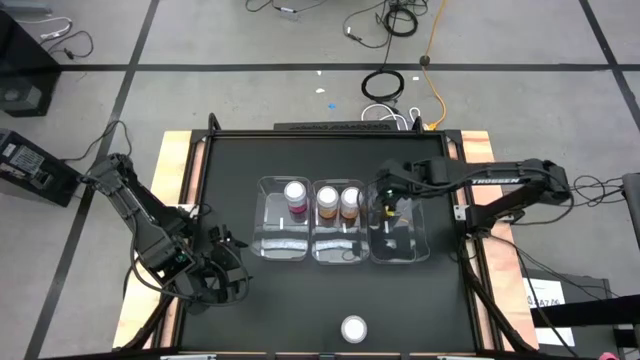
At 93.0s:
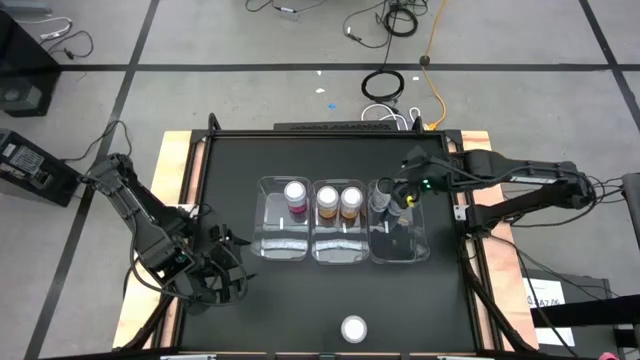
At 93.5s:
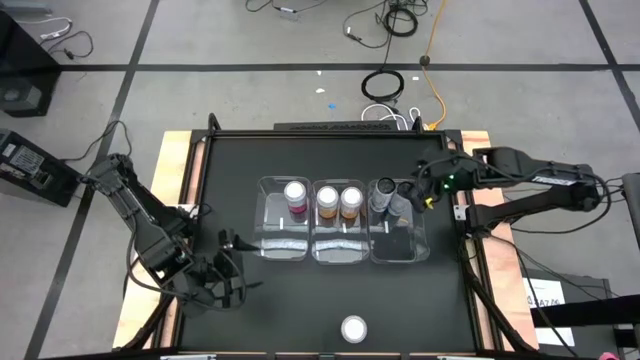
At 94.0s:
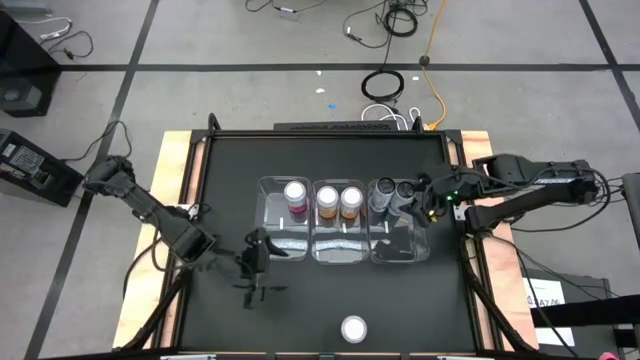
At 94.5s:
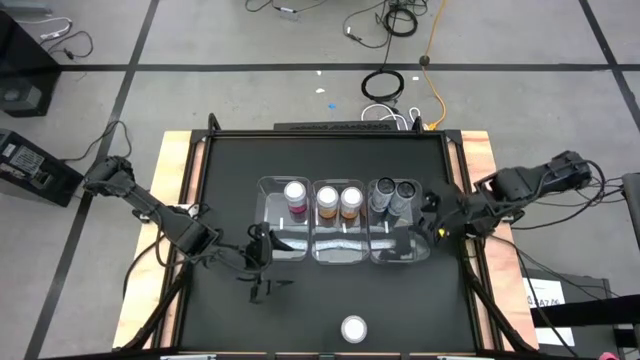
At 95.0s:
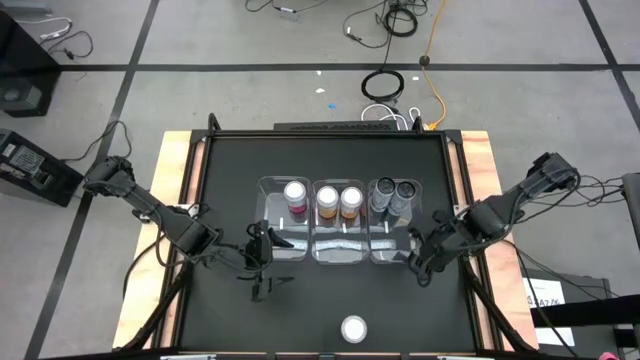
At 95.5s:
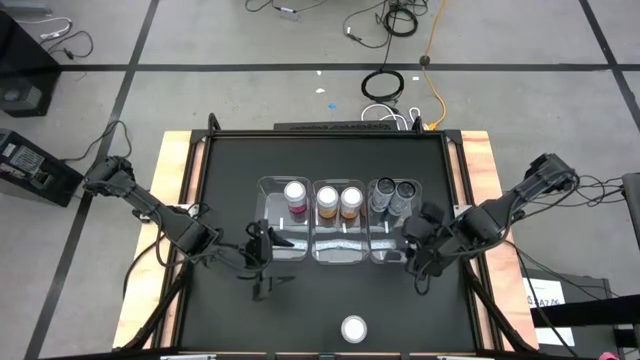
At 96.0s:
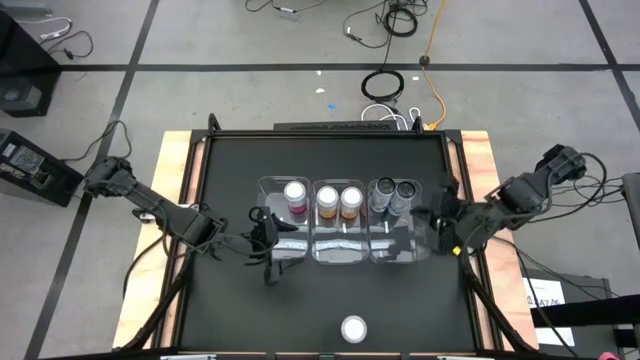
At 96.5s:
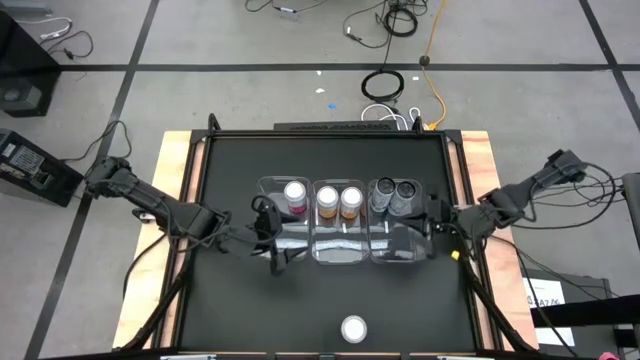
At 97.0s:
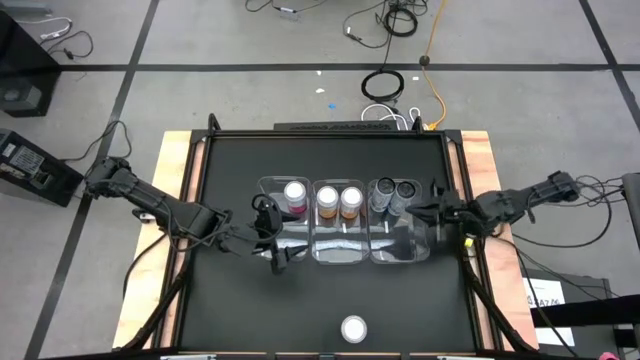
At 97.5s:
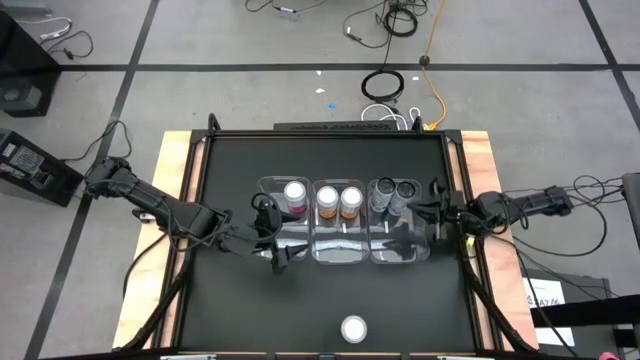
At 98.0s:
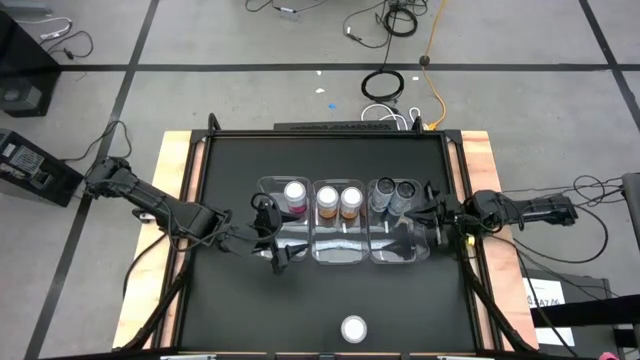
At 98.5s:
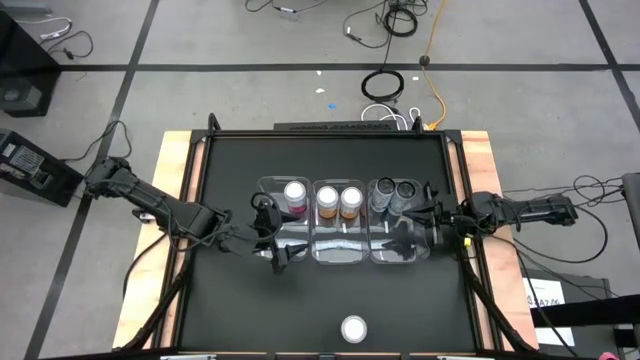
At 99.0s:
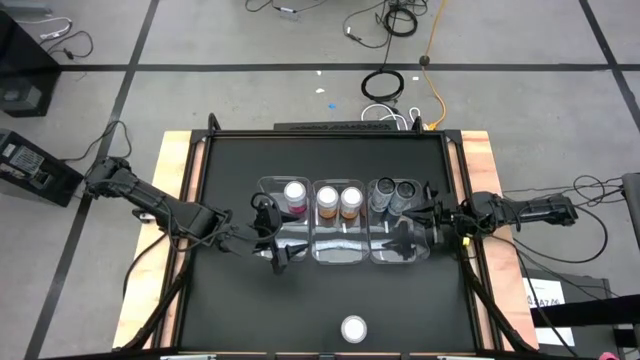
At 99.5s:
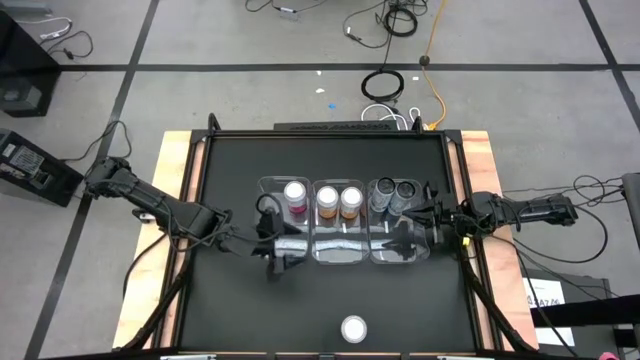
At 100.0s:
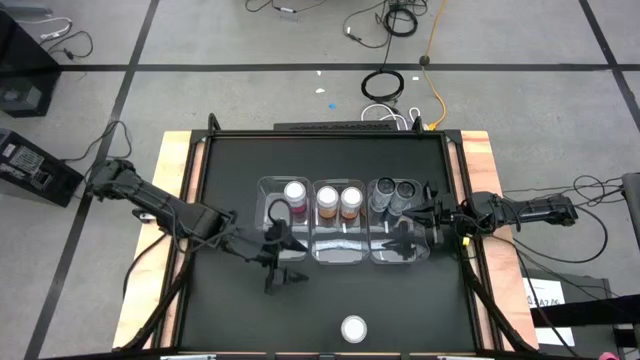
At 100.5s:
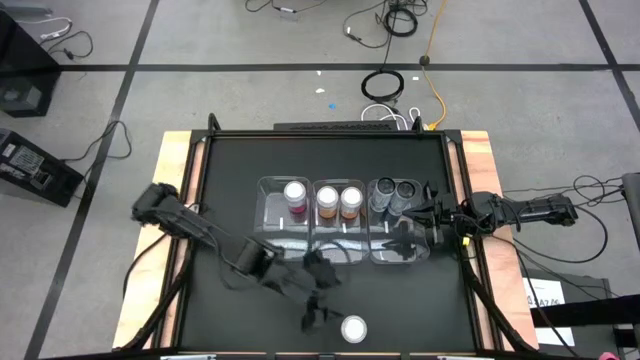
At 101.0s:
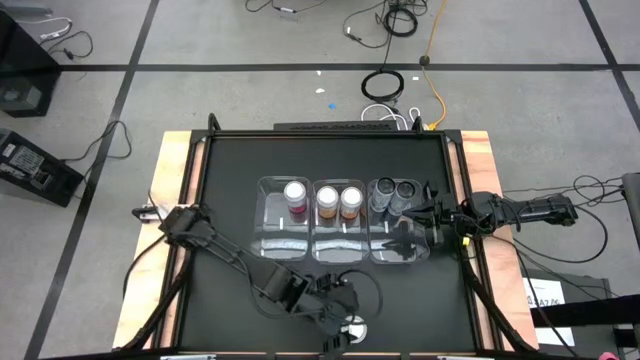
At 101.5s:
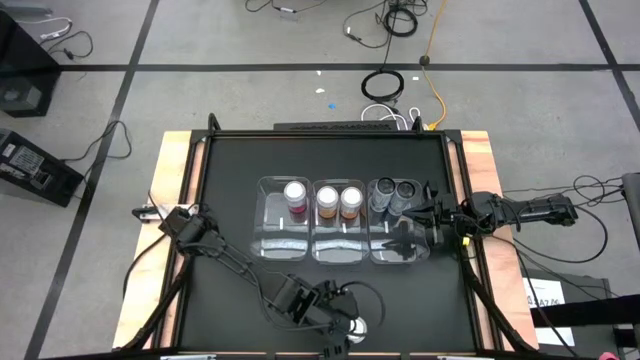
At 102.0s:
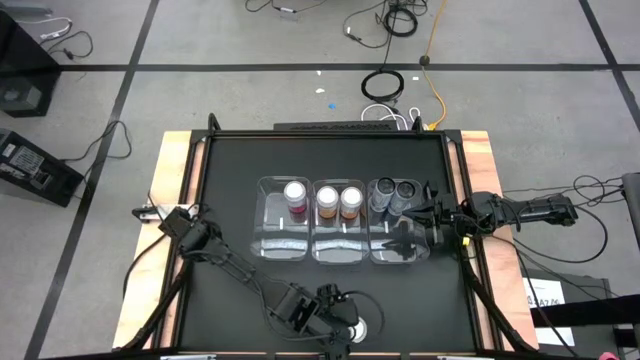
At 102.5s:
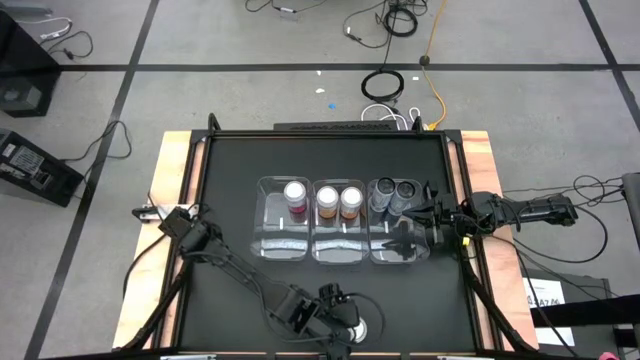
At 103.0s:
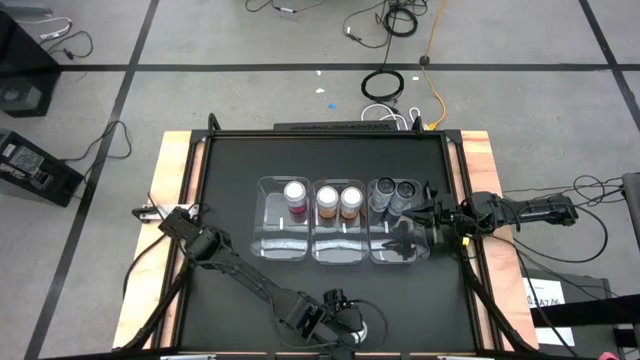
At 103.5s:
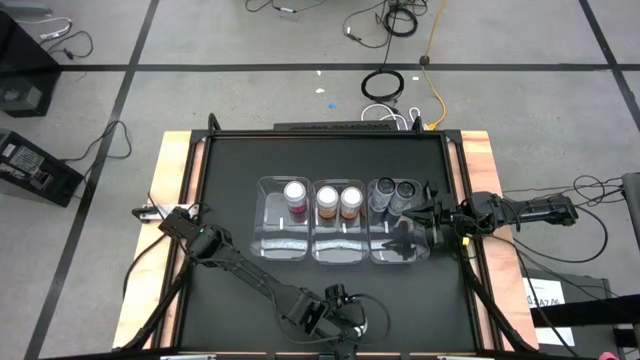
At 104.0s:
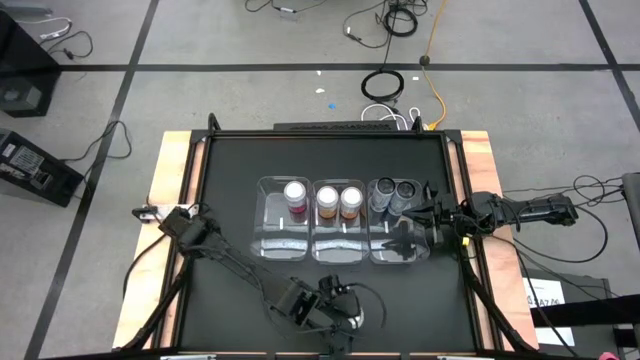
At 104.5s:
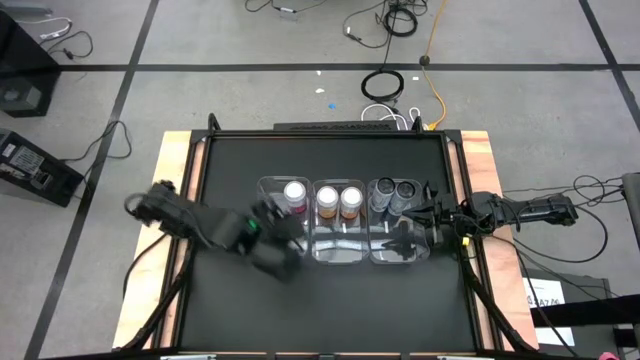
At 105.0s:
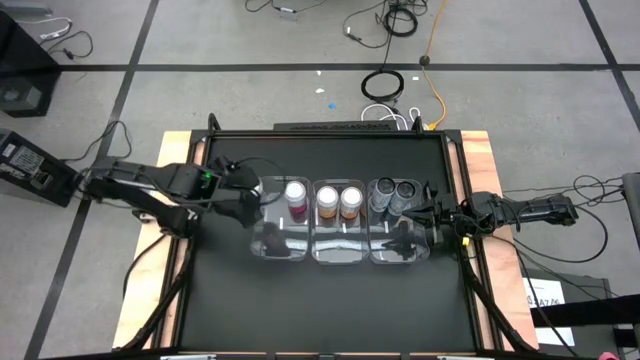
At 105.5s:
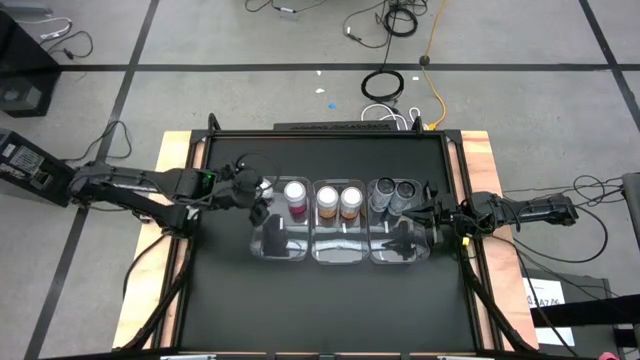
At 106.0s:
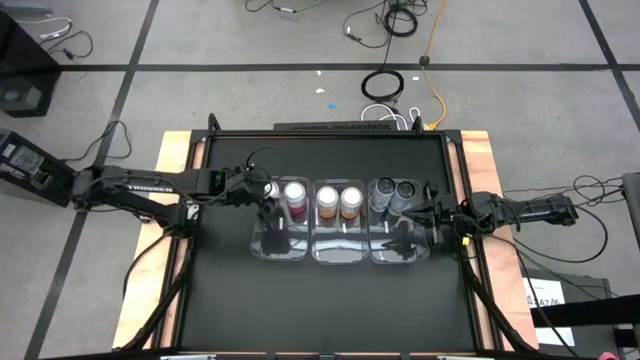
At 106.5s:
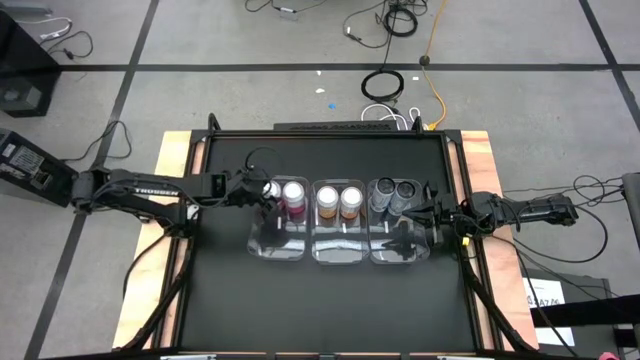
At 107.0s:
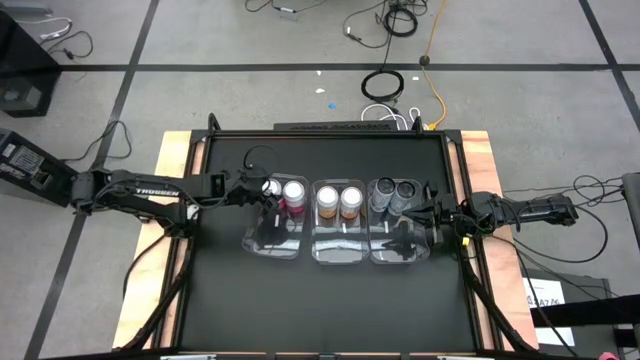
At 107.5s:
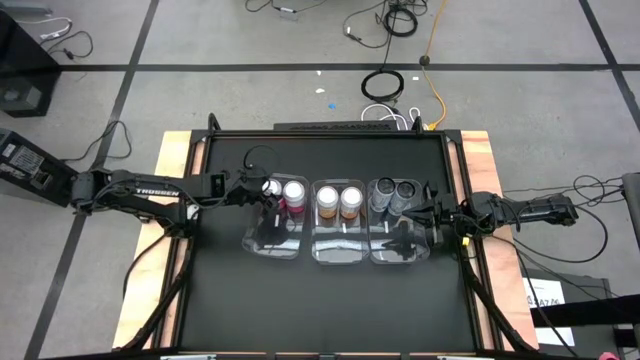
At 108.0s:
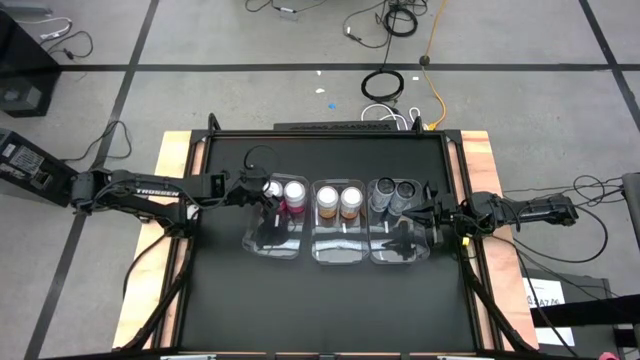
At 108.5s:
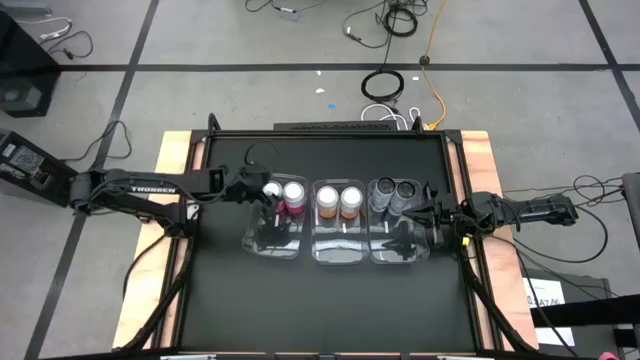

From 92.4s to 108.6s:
Task: Sort soda cans
Put the pink white soda can into the left transparent bin

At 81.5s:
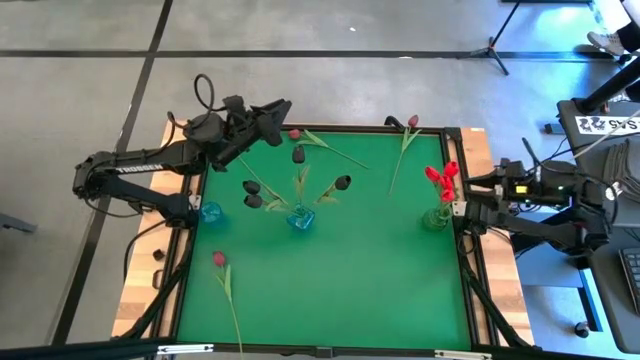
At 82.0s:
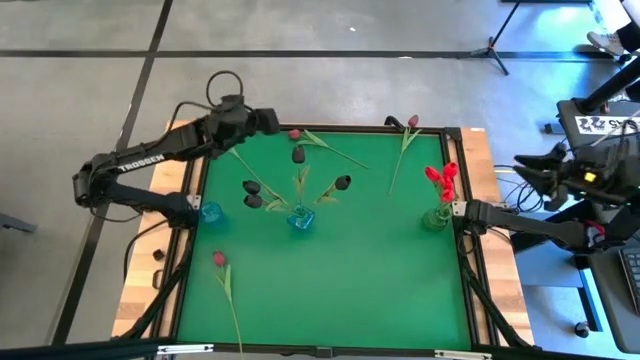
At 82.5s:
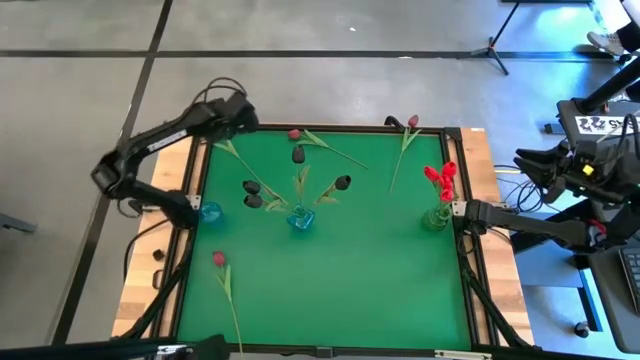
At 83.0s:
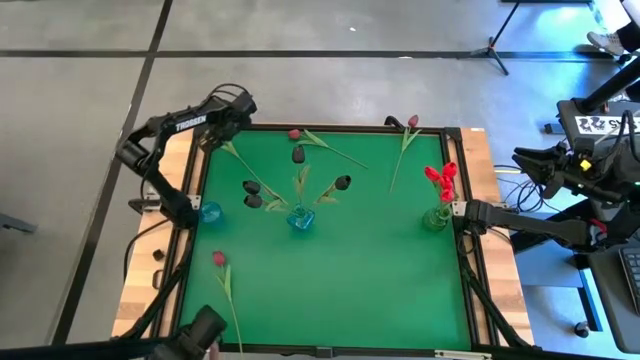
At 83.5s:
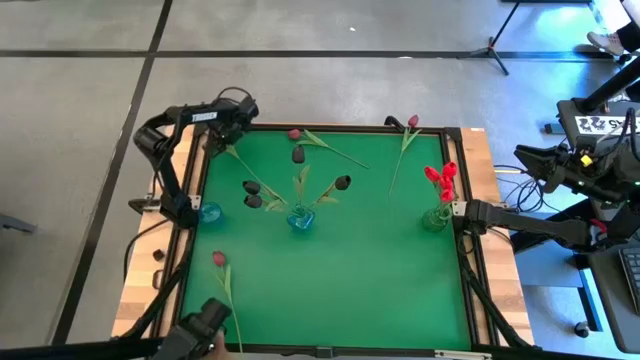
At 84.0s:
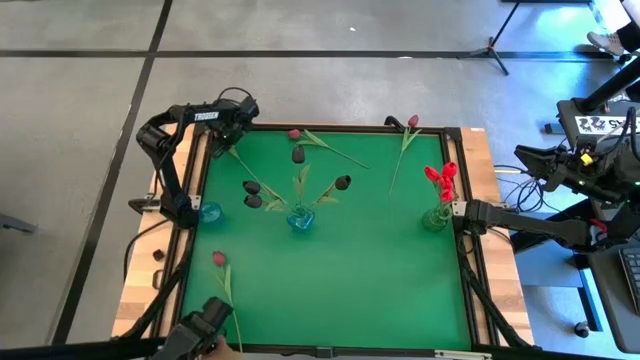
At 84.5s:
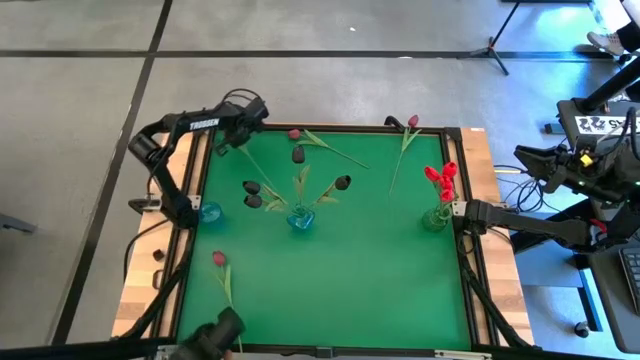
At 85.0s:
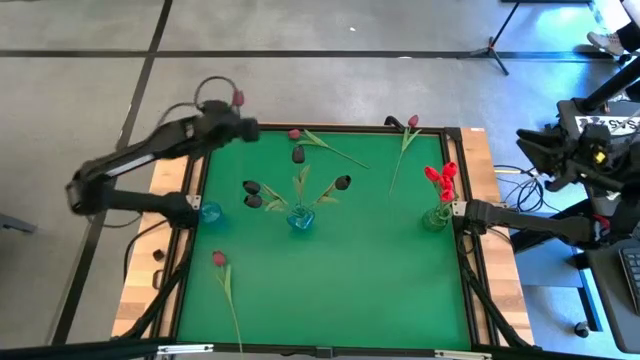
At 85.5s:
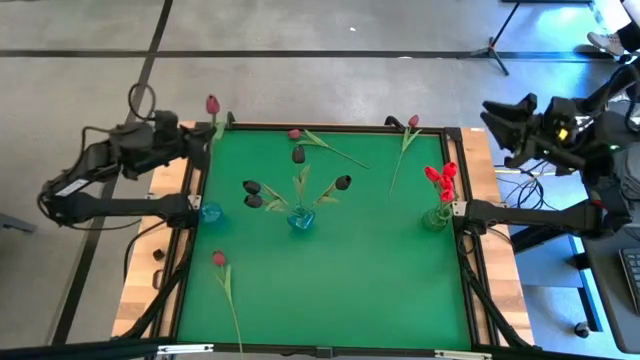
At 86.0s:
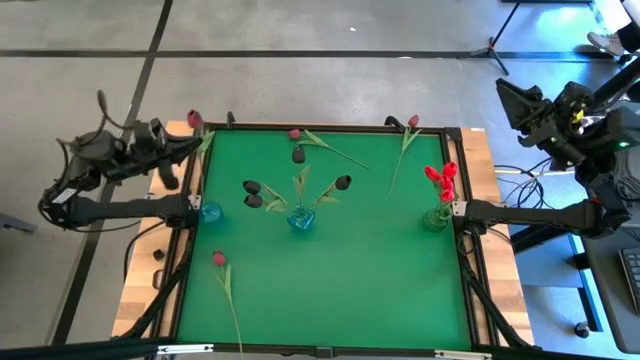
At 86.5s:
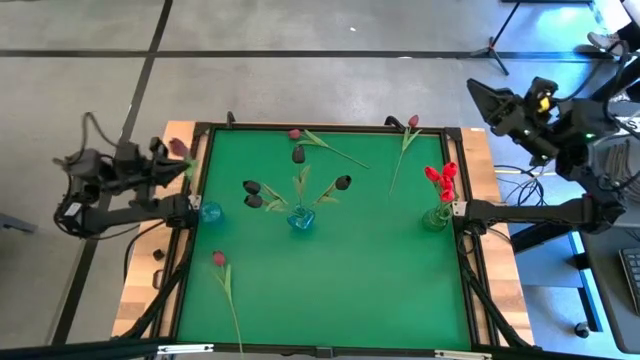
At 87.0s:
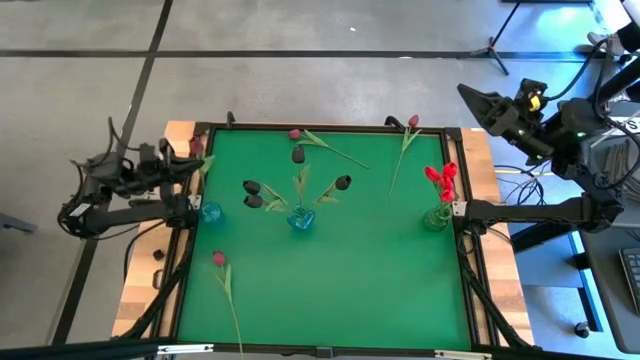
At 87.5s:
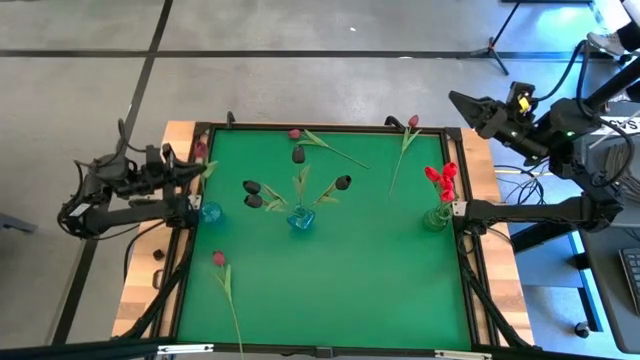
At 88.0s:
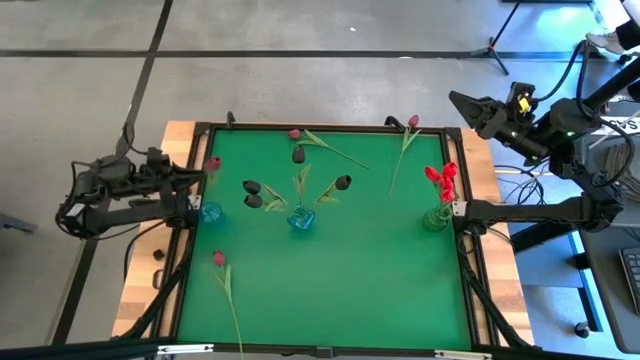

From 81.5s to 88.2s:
Task: Sort flowers into vase by color
Put the top left pink tulip into the left blue vase
